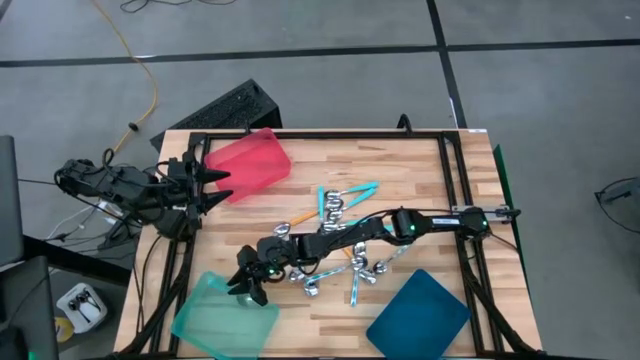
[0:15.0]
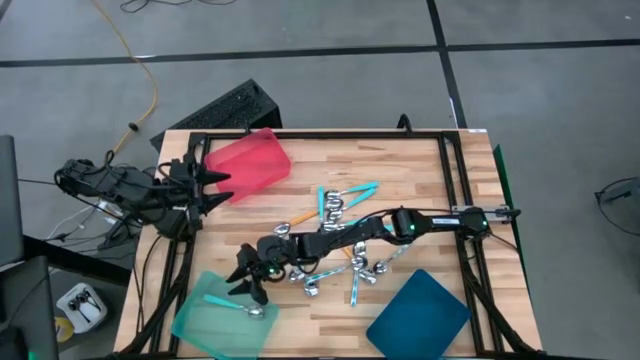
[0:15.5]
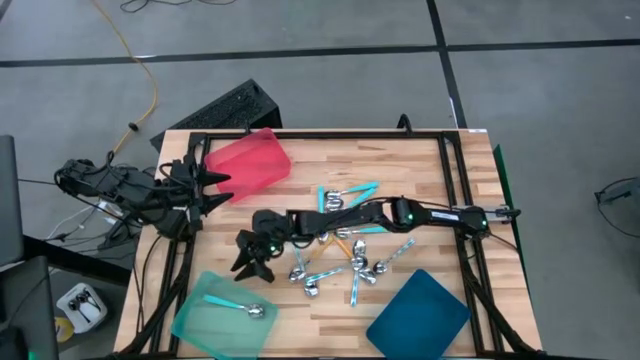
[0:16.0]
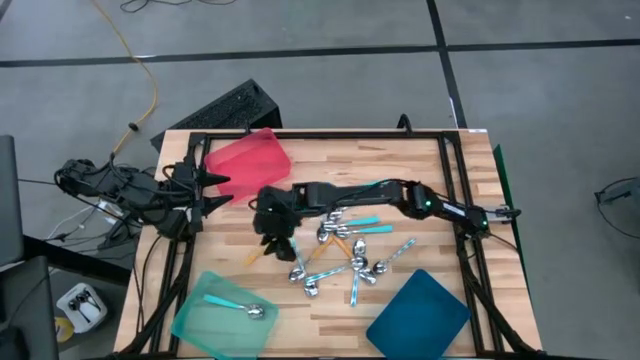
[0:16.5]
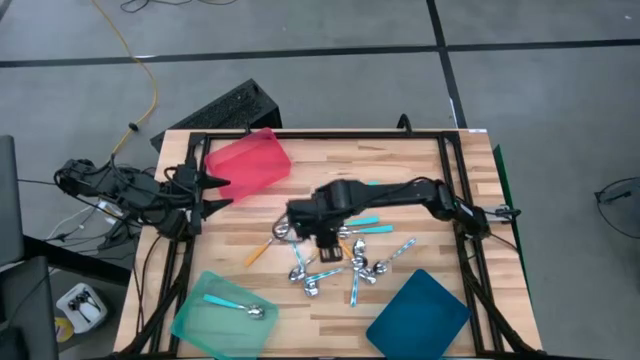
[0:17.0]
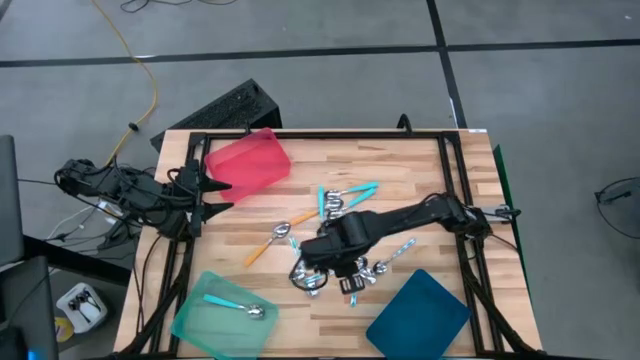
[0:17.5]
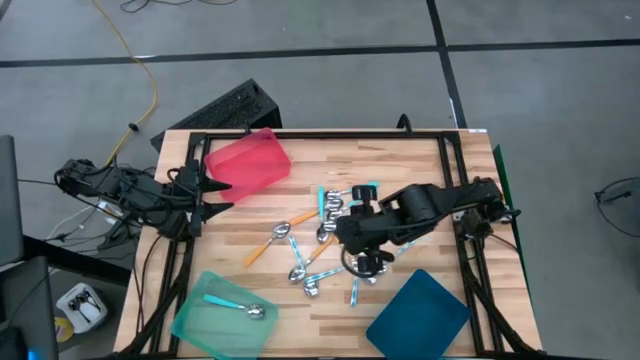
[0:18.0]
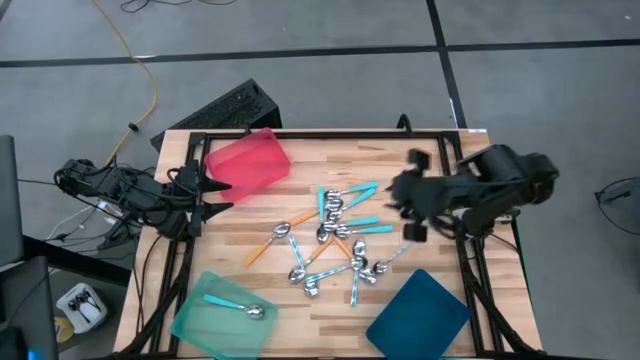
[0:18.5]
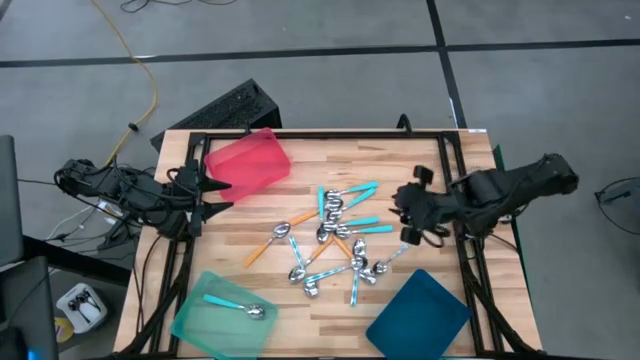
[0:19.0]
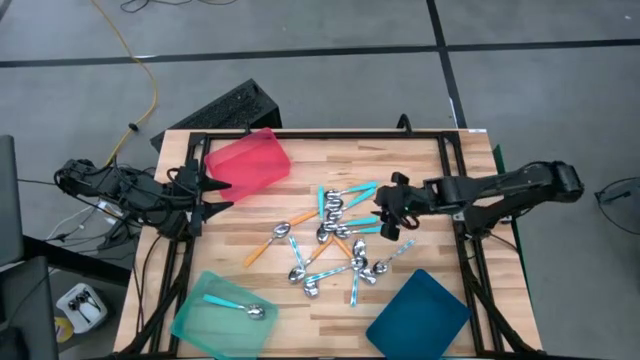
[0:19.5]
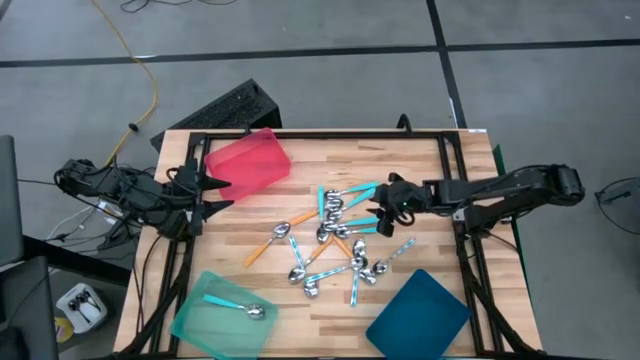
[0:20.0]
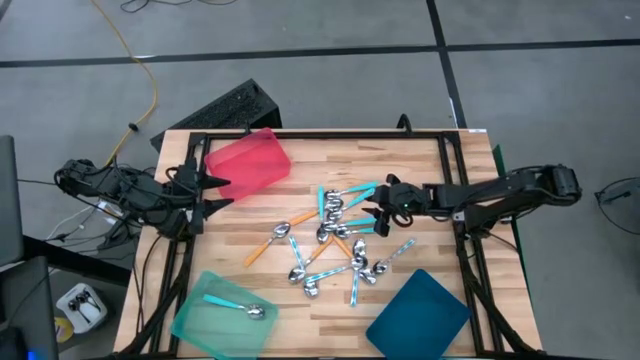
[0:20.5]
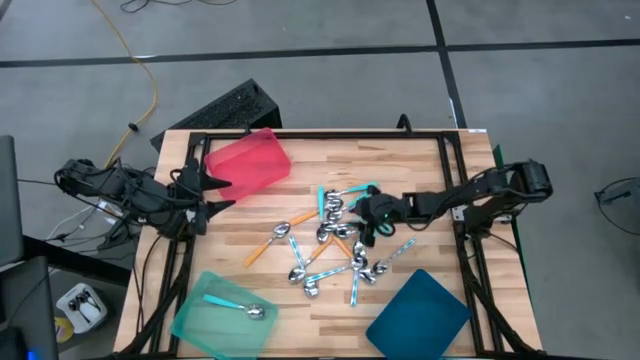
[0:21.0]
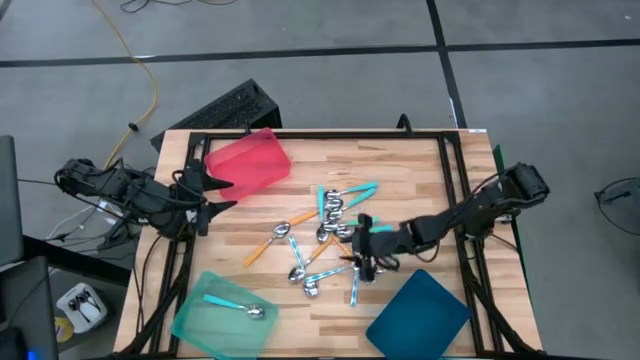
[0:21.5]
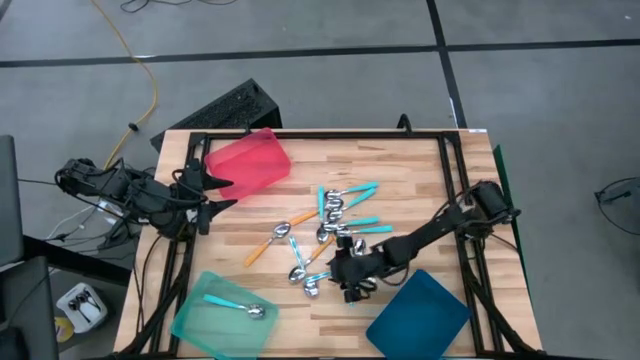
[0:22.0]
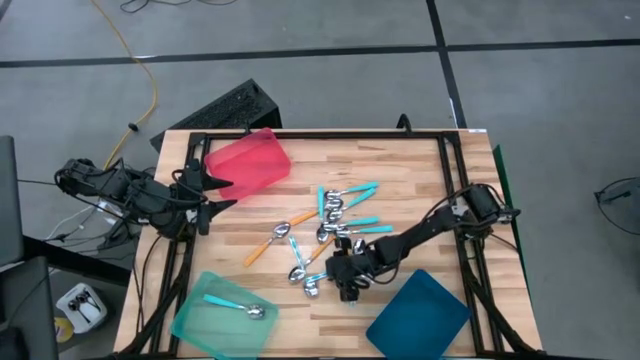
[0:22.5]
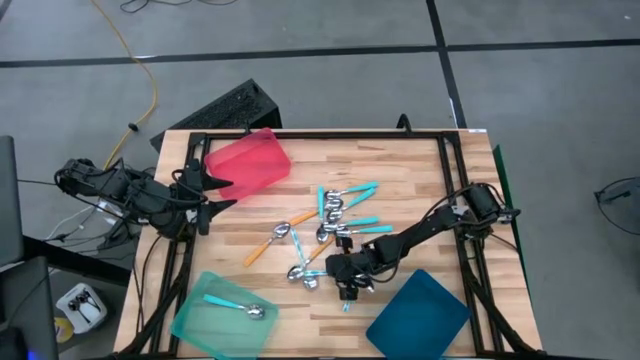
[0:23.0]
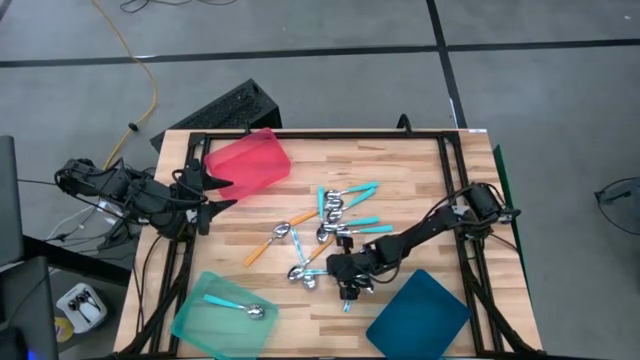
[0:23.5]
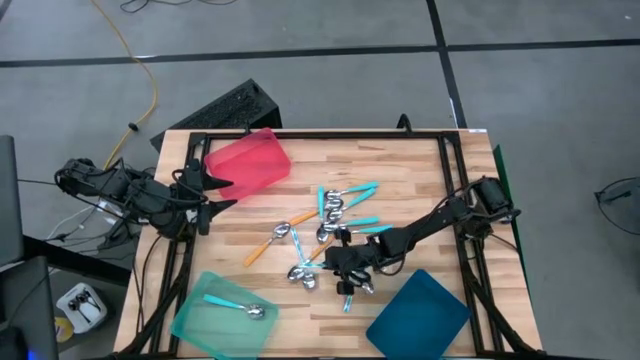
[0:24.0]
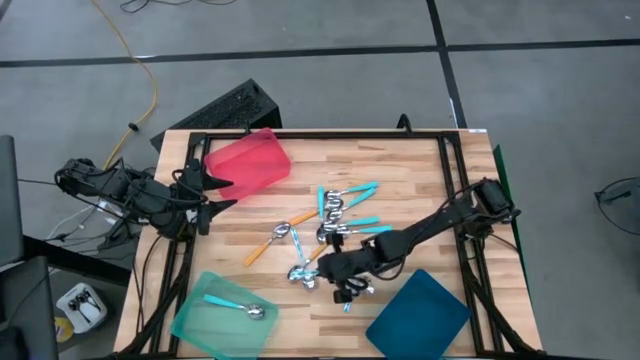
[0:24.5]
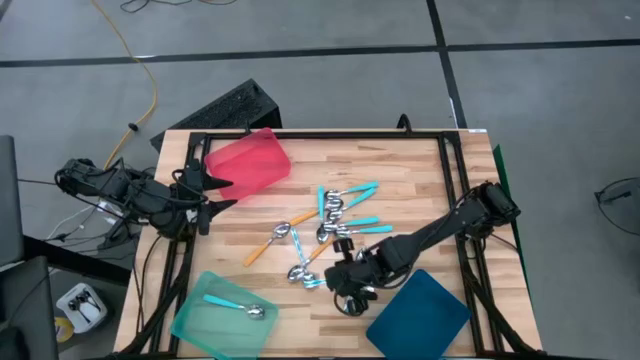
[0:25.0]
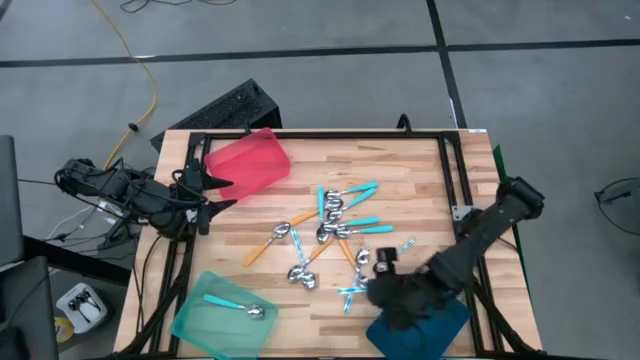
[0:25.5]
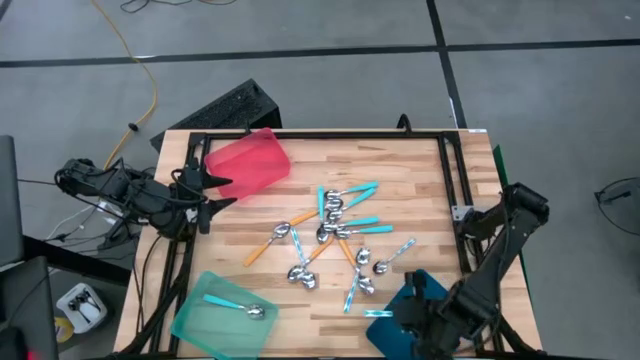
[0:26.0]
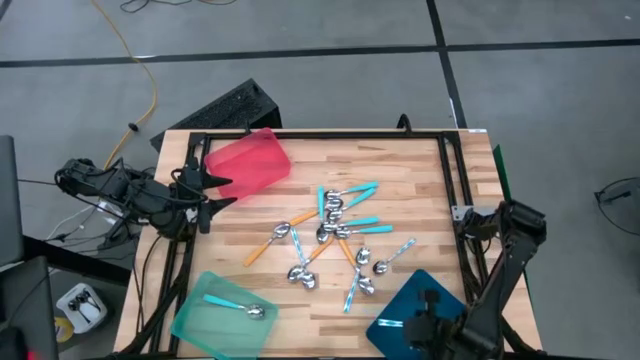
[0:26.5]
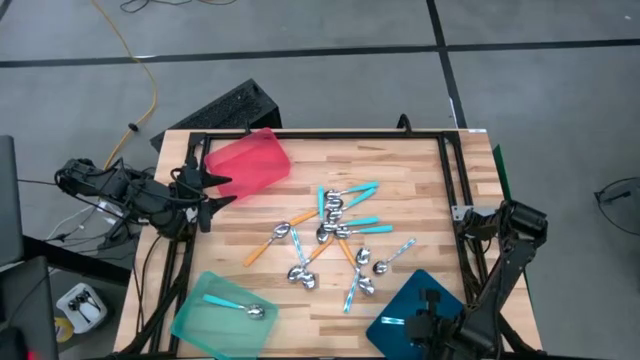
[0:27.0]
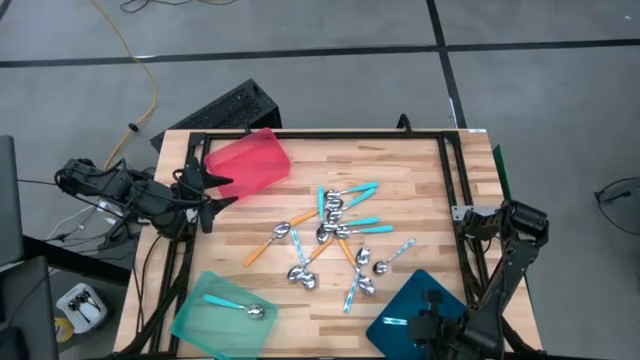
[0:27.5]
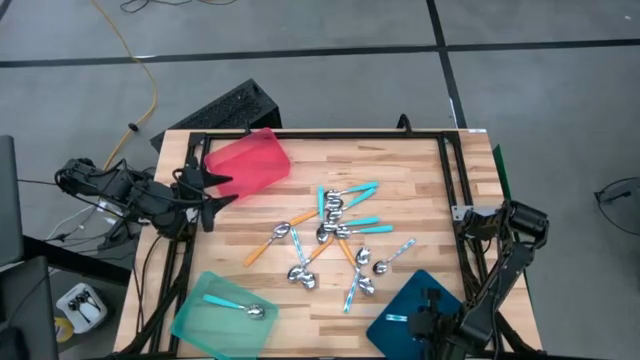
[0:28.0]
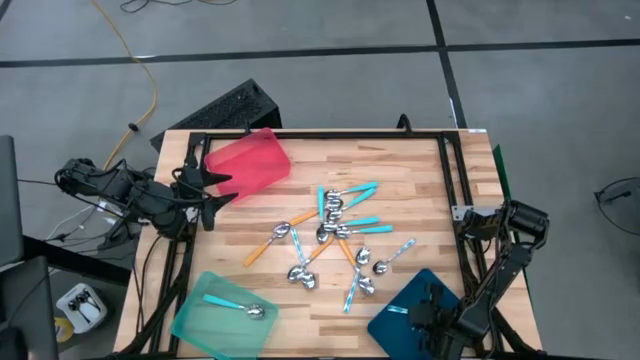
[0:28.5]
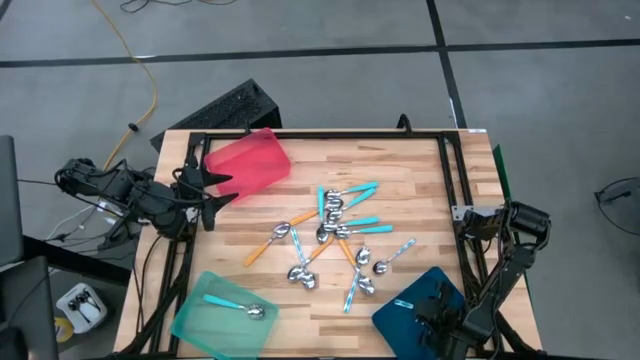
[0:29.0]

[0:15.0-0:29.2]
Task: Sort silverware by color (type)
Put the blue patterned spoon into the blue bin

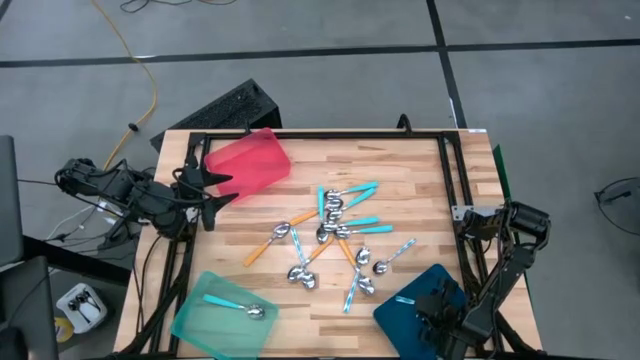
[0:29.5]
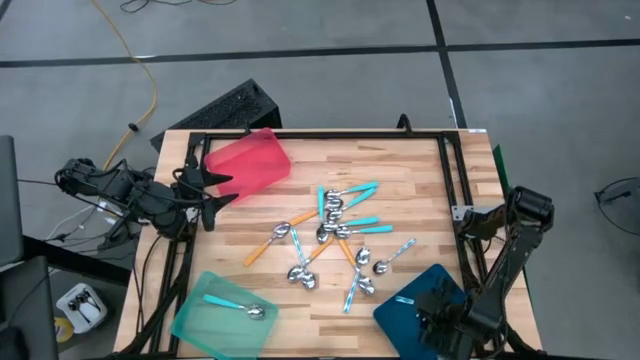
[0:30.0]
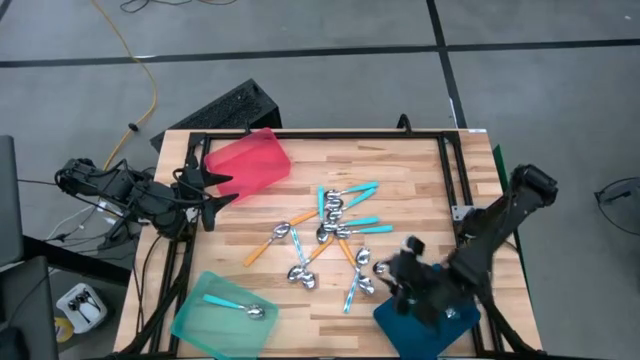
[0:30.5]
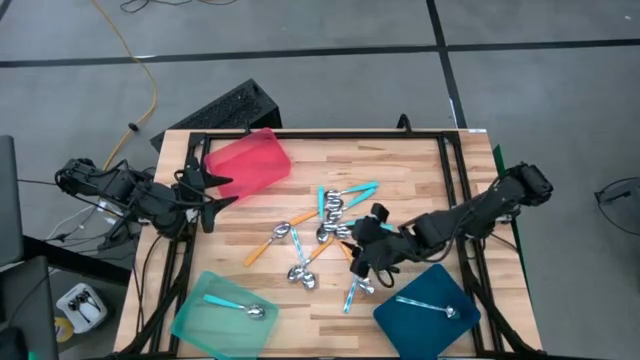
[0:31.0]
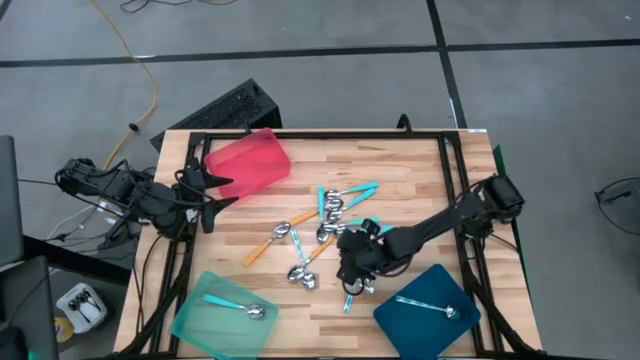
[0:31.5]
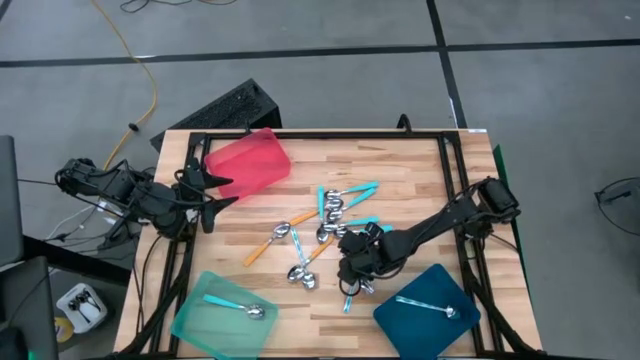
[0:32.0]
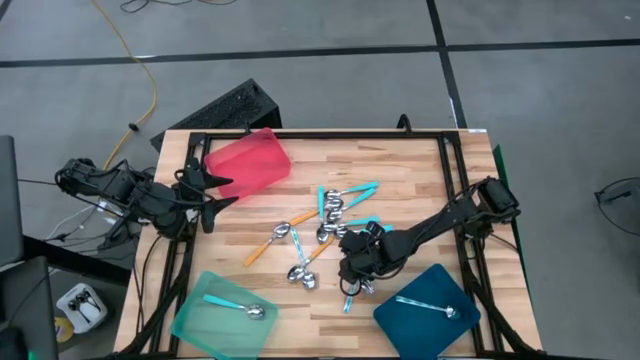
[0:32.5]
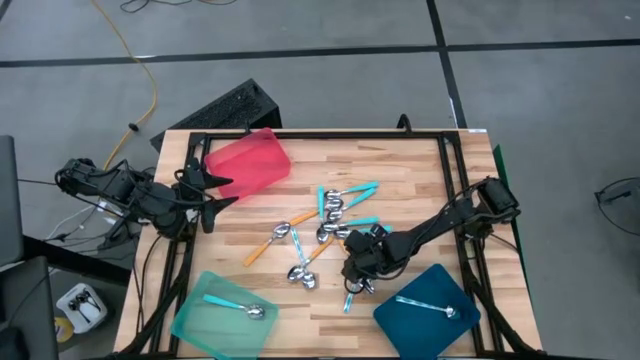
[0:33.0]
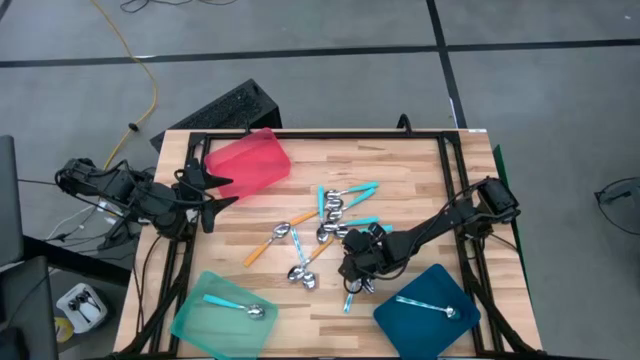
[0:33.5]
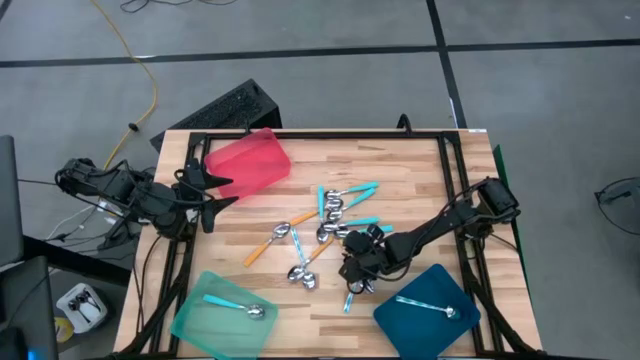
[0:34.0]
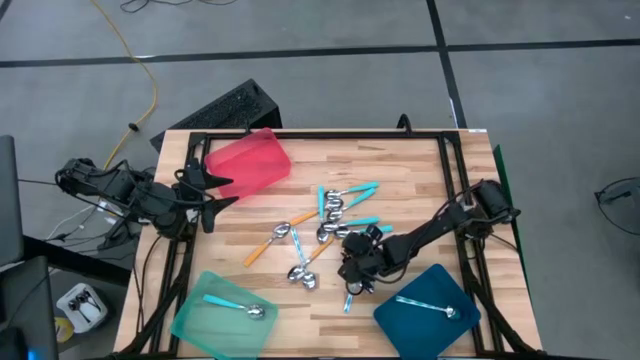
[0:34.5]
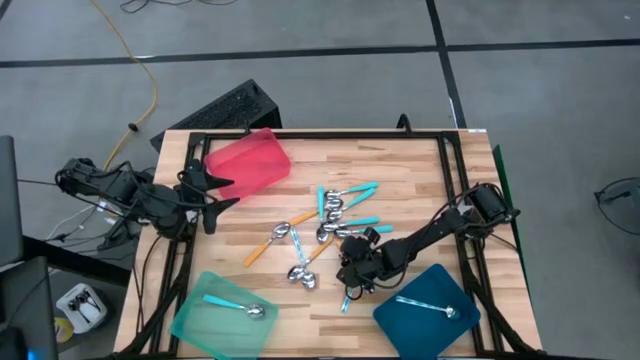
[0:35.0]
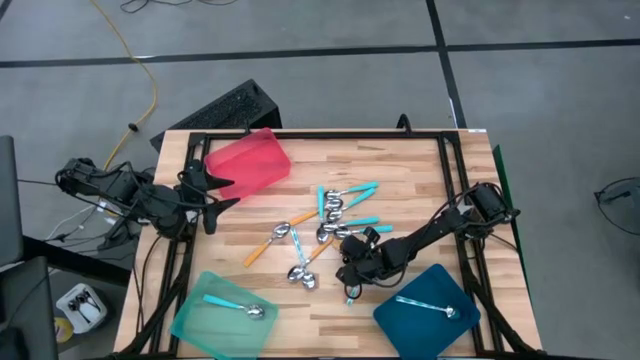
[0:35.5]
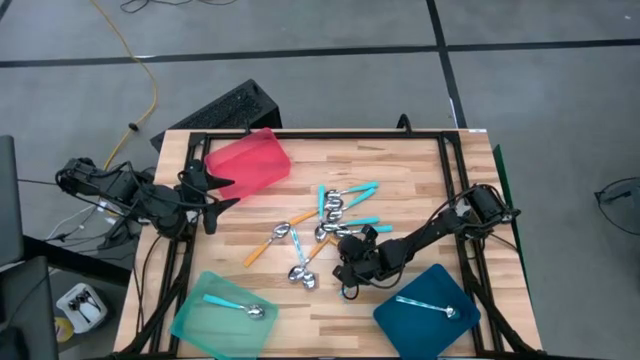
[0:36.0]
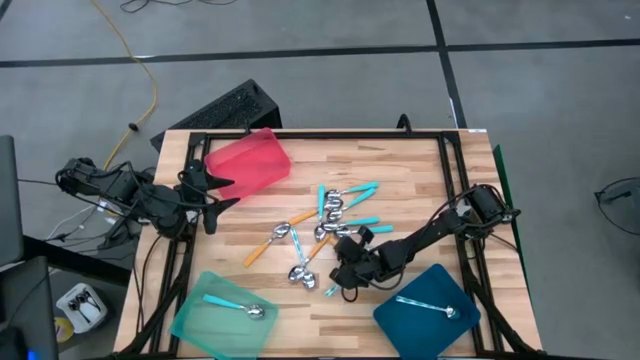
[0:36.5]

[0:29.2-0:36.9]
Put the yellow spoon into the pink bin
